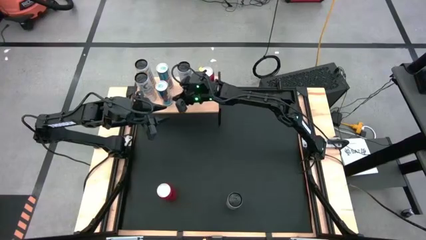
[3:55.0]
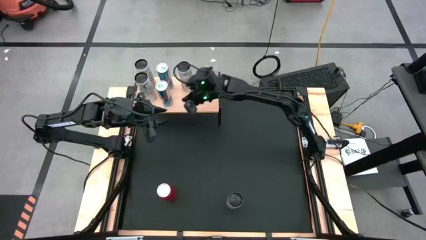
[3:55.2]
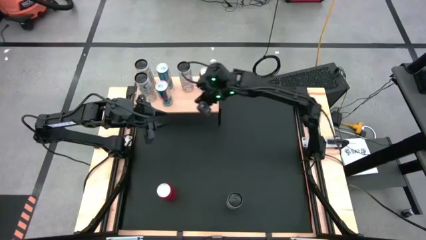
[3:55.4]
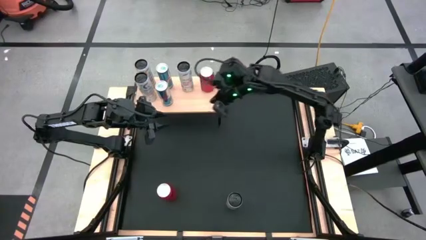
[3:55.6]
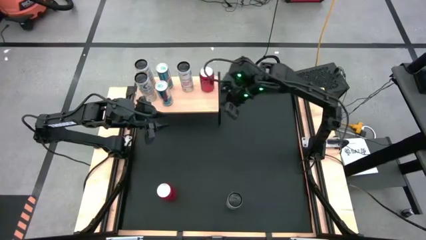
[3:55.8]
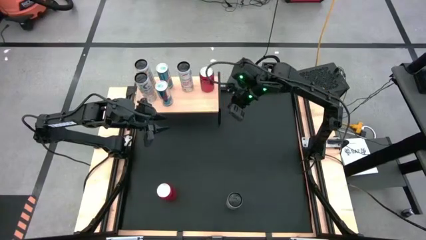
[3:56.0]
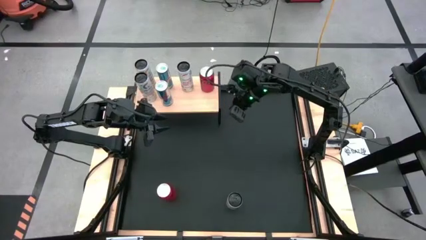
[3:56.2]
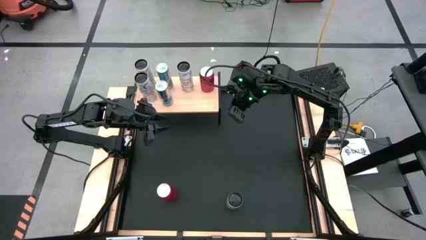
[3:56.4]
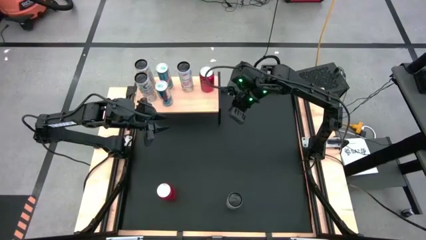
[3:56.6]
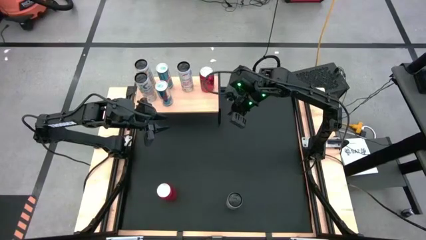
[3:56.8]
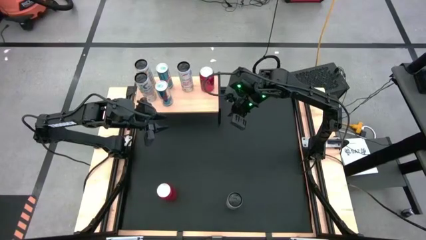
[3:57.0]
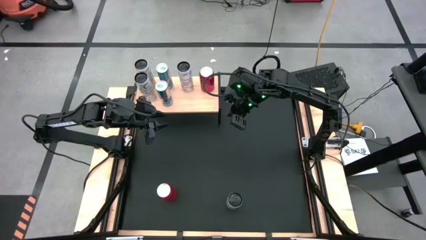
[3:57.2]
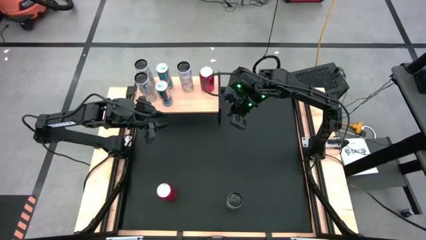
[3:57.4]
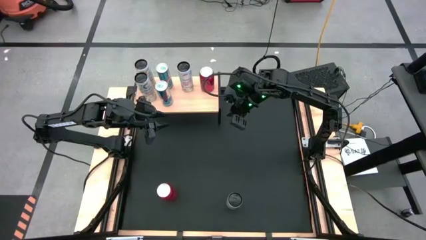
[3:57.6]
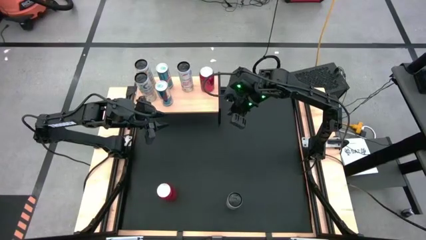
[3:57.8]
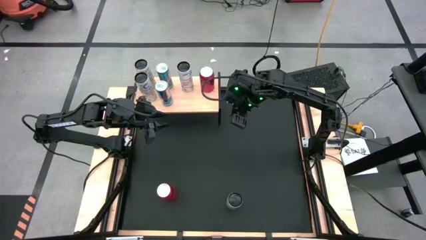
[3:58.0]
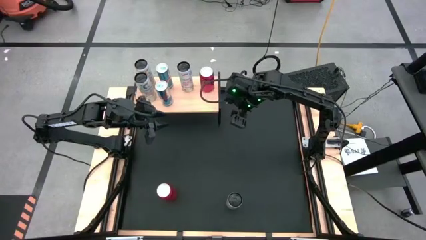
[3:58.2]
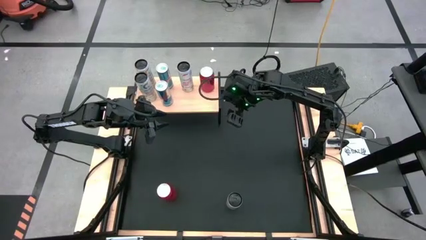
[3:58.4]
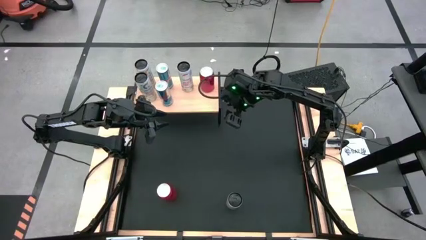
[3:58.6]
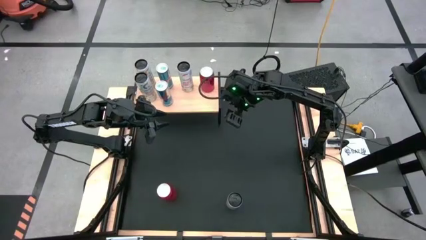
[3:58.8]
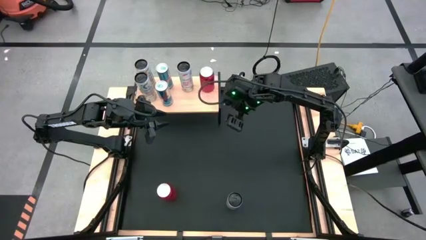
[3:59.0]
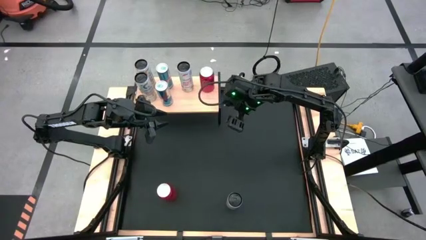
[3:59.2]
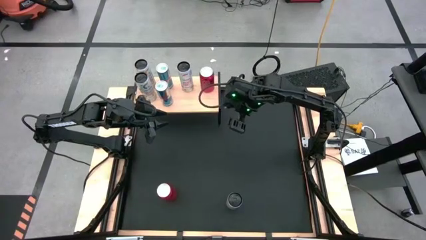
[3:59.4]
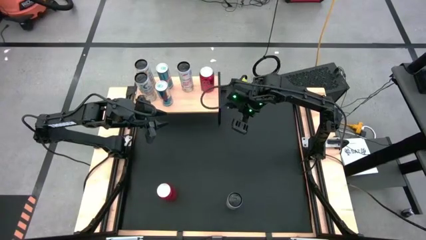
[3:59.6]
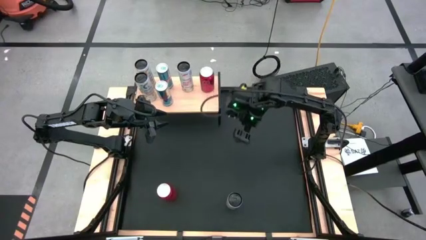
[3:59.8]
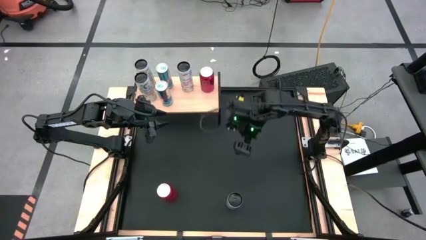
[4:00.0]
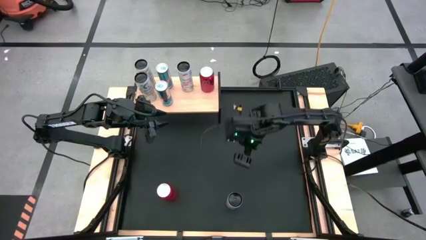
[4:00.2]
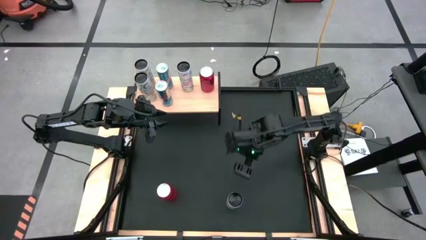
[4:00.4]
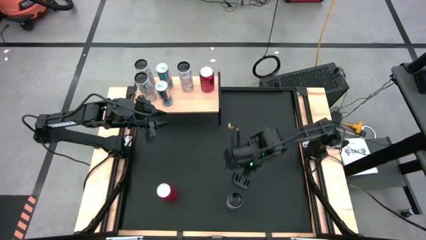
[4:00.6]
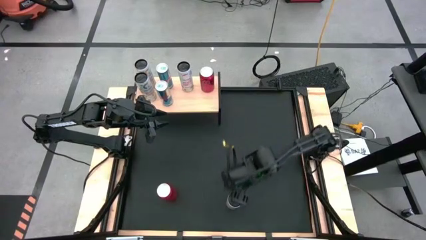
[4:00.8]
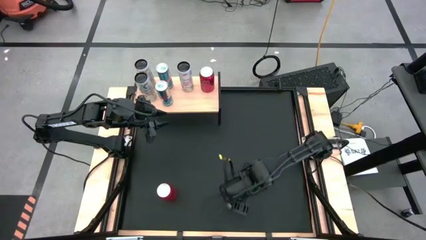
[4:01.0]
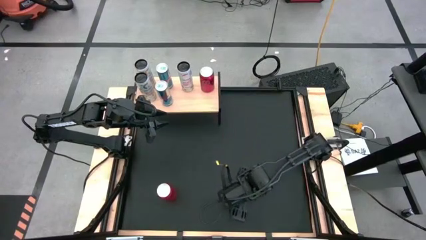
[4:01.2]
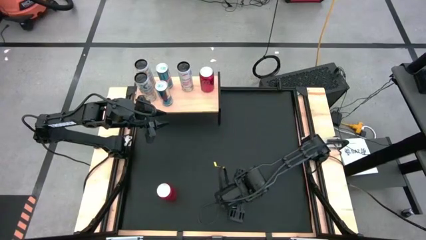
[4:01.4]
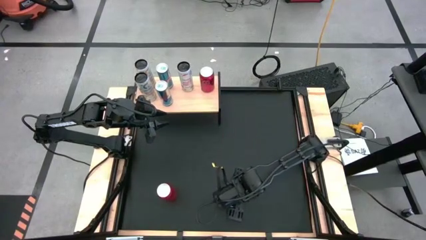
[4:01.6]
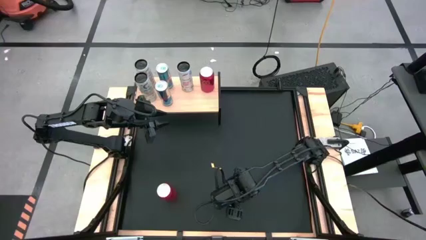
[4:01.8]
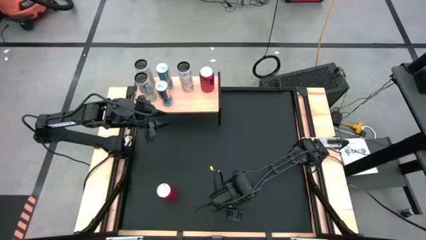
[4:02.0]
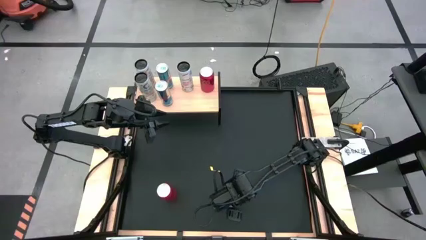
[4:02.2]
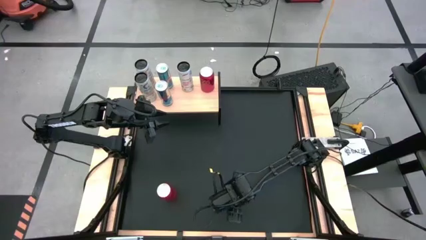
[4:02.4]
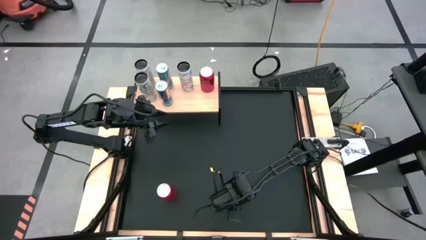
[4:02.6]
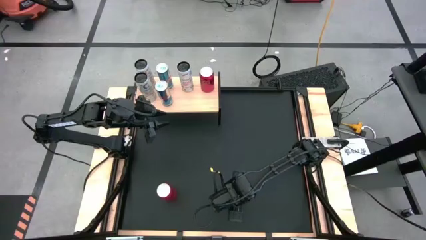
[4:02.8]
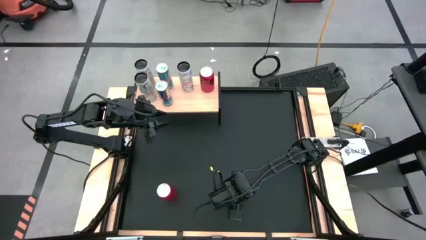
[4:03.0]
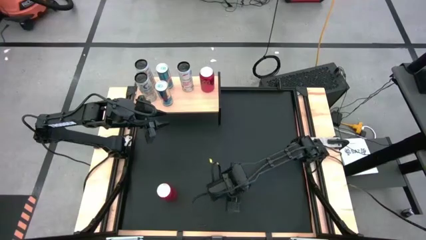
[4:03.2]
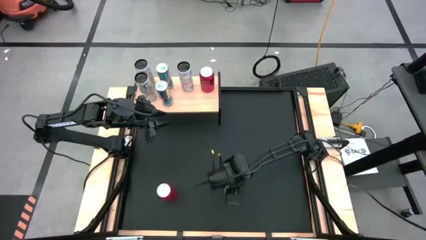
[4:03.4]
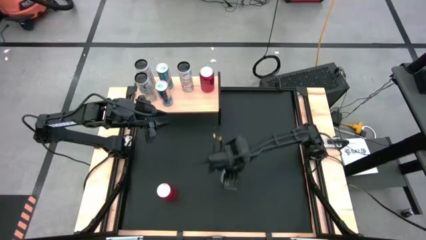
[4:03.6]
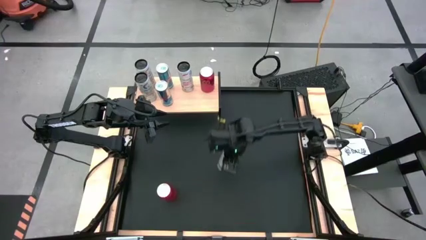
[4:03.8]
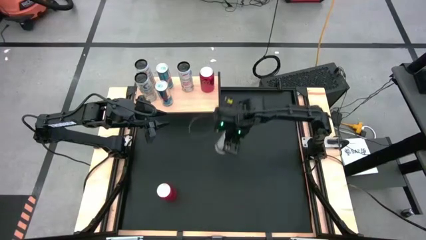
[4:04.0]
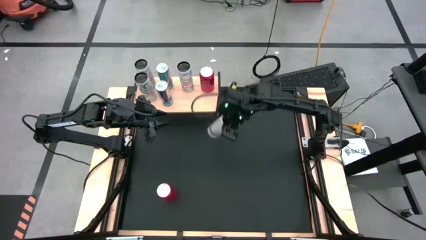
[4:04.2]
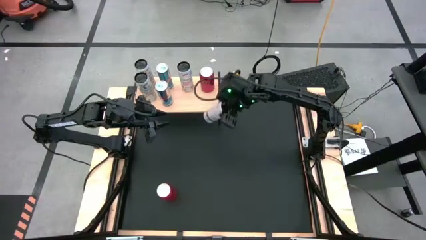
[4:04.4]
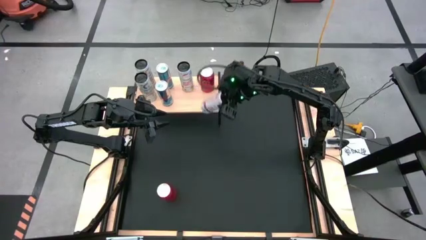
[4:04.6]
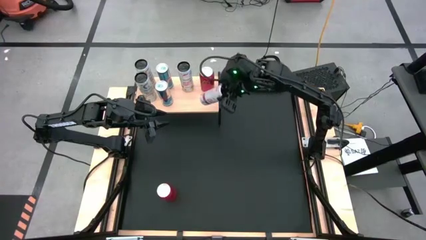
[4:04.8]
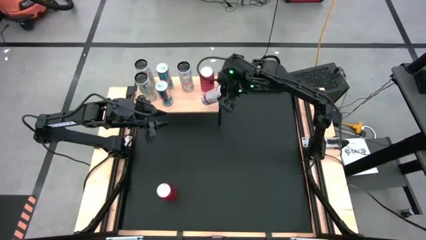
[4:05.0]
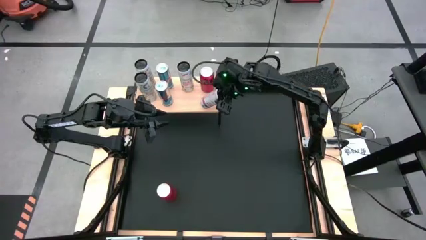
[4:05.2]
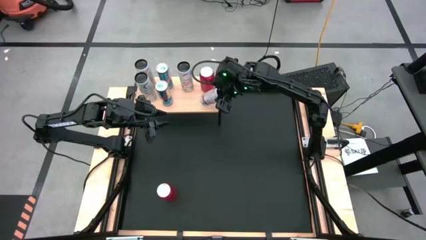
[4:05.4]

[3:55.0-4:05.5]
Task: Place canned beverage on shelf
Put the white pink soda can on the shelf aligned with the white pink soda can

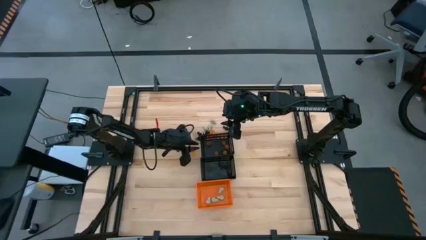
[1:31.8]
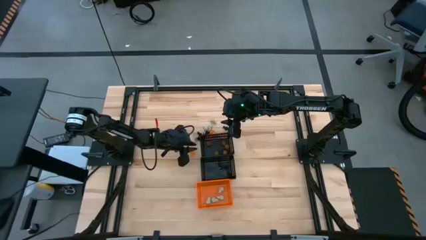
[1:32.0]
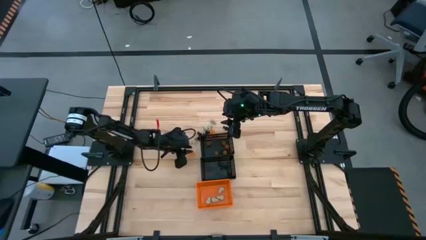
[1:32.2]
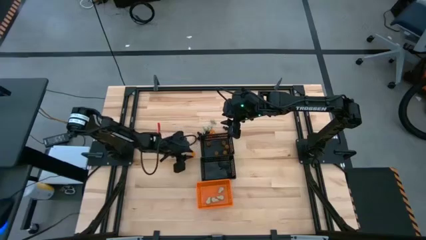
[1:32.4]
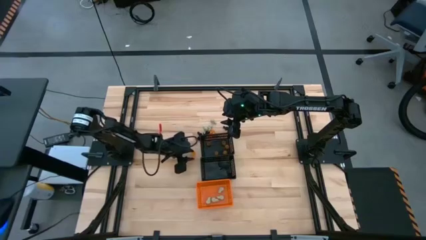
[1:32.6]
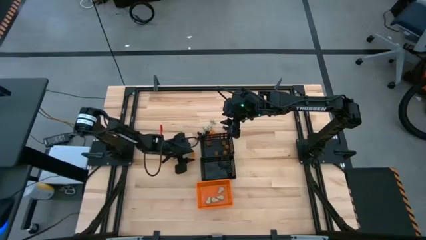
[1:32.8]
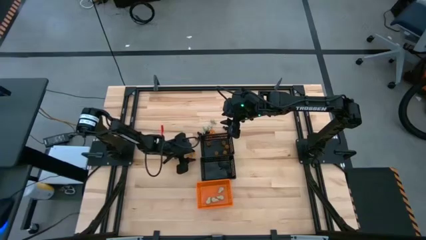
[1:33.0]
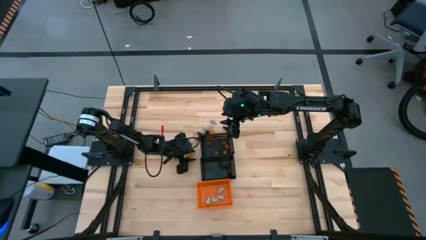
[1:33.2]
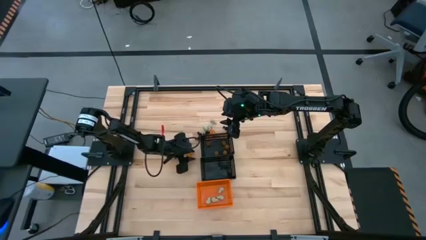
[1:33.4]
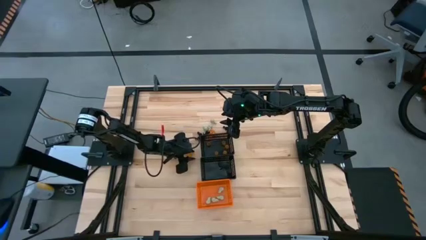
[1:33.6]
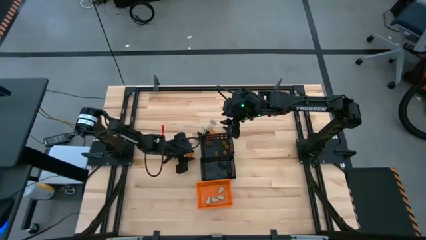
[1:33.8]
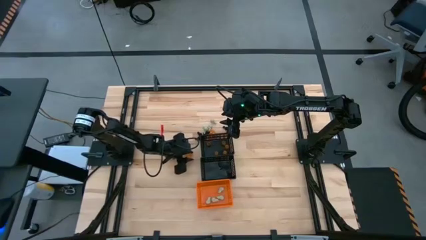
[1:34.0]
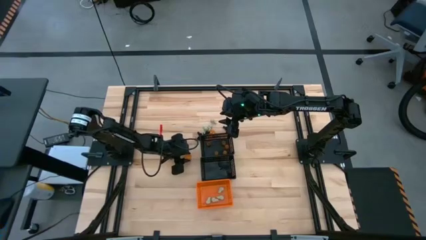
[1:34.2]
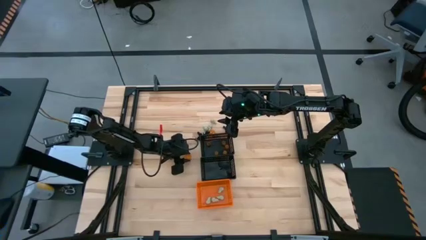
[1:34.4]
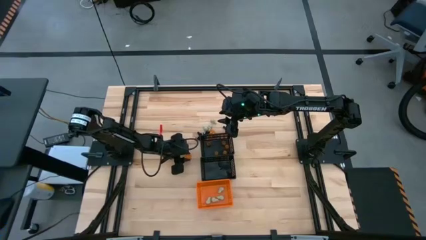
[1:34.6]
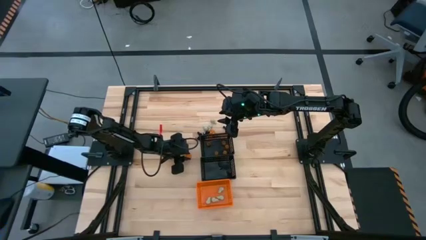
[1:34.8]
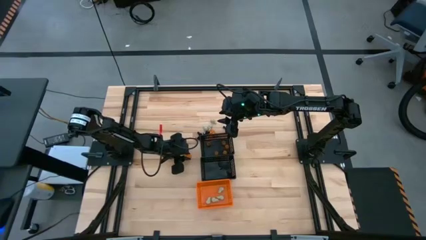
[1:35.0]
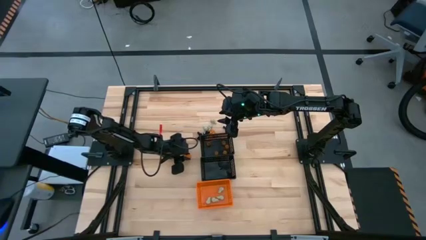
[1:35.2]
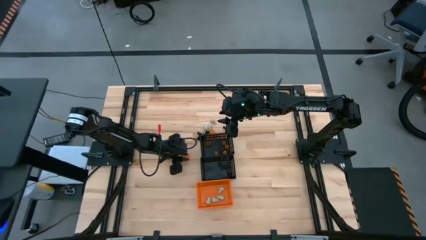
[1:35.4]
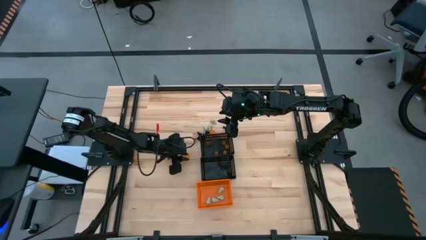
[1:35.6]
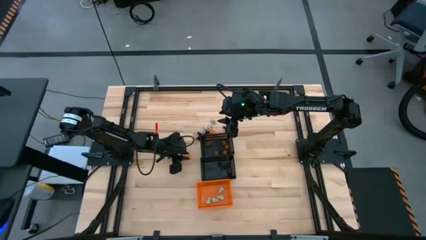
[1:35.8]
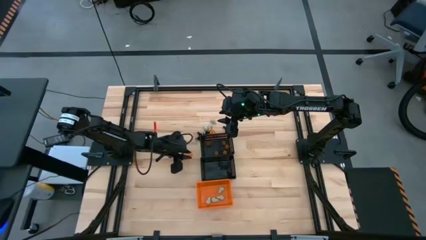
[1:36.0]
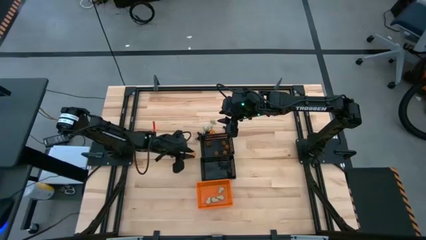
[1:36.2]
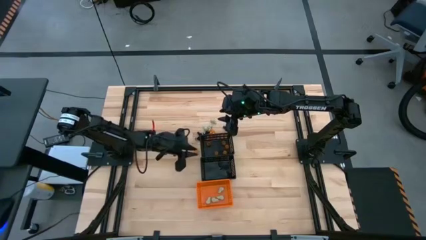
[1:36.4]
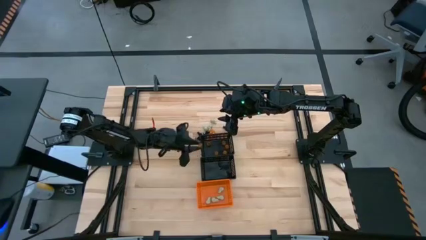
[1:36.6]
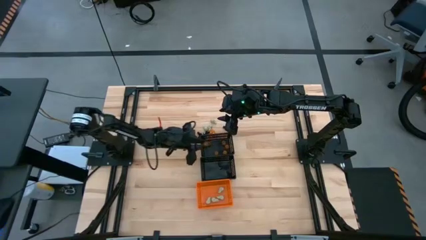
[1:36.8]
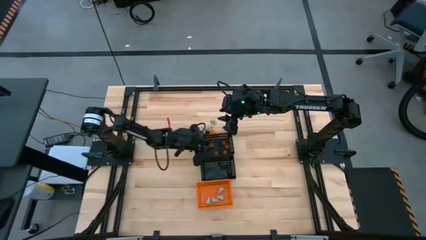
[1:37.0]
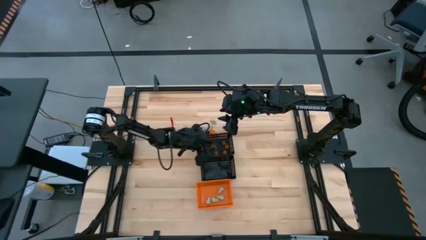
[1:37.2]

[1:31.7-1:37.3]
Task: Sort Halloween decoration
Put the orange pumpkin toy into the top black bin
